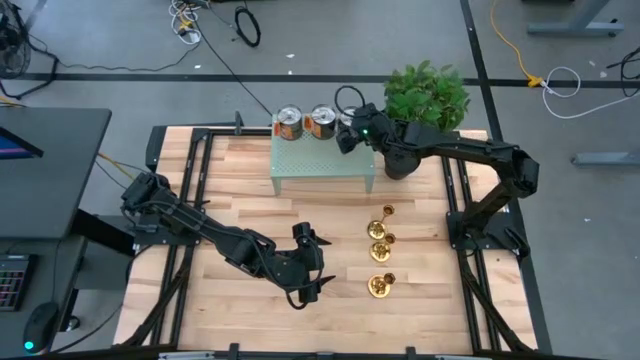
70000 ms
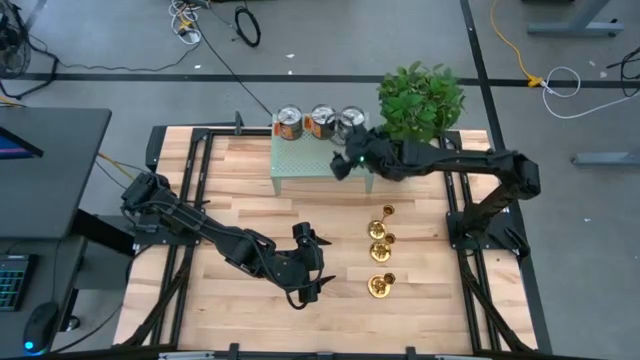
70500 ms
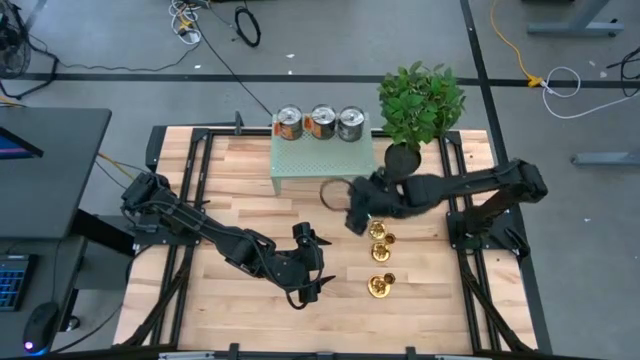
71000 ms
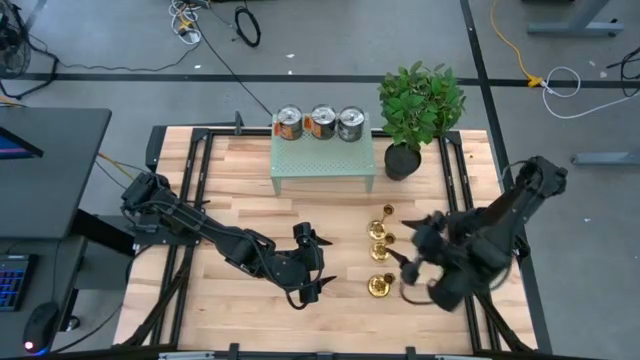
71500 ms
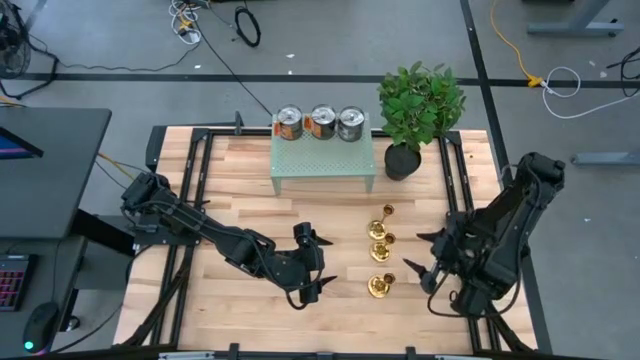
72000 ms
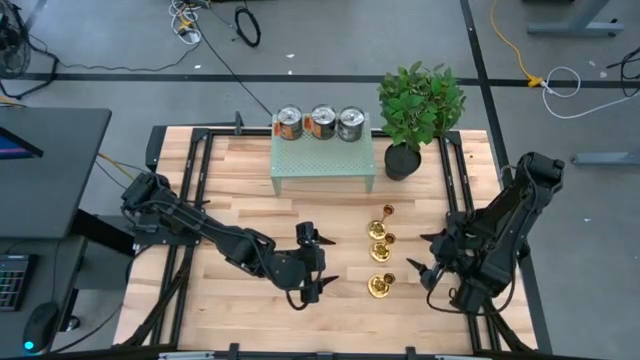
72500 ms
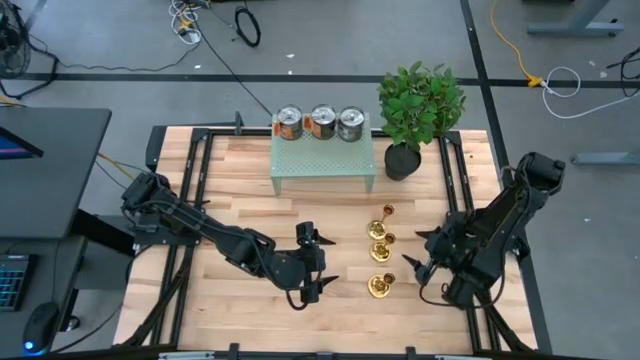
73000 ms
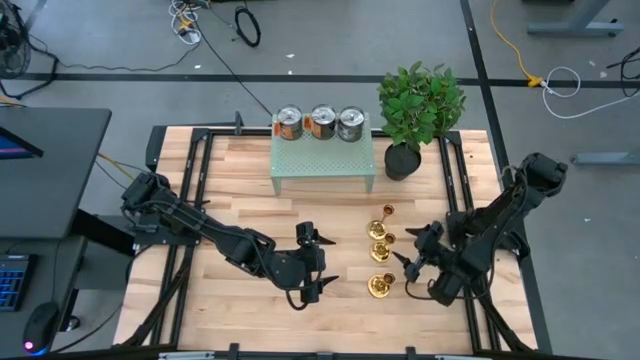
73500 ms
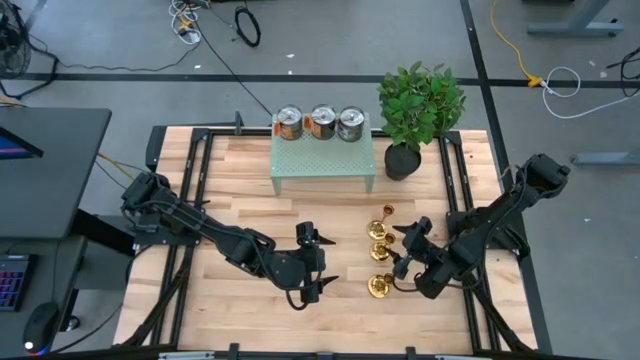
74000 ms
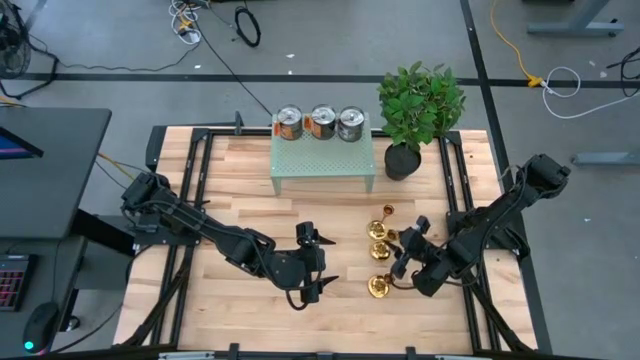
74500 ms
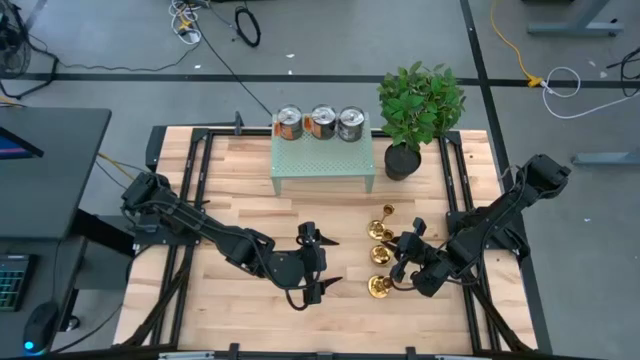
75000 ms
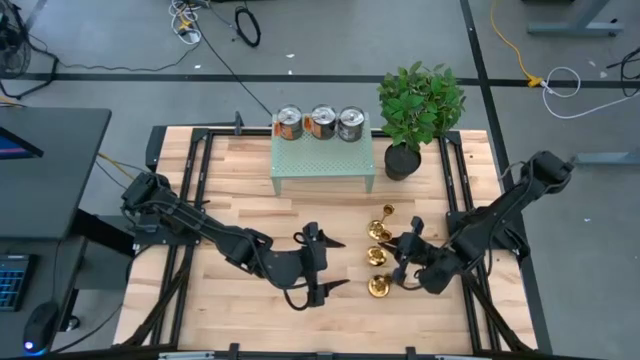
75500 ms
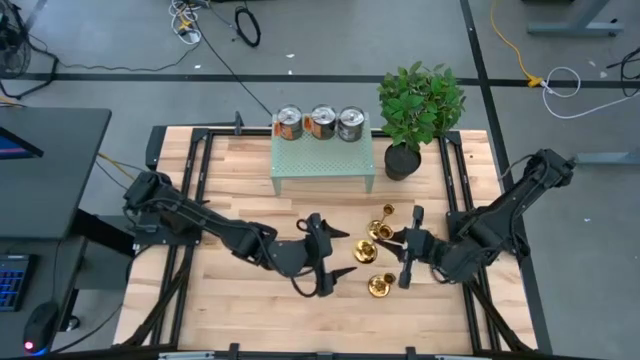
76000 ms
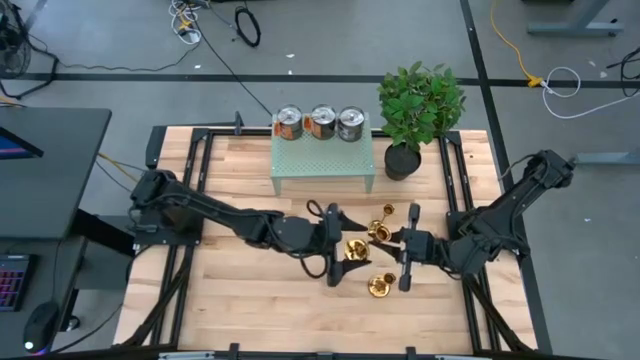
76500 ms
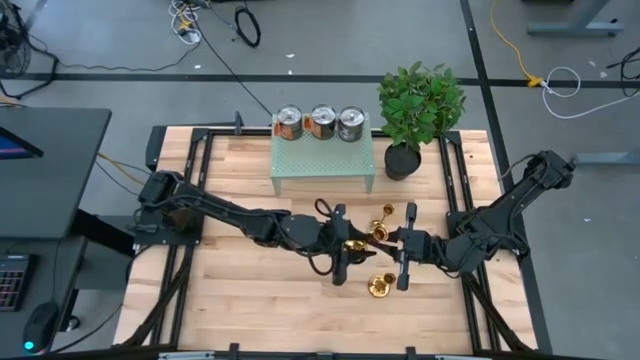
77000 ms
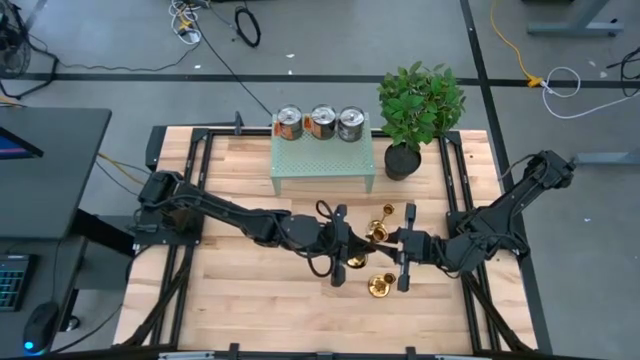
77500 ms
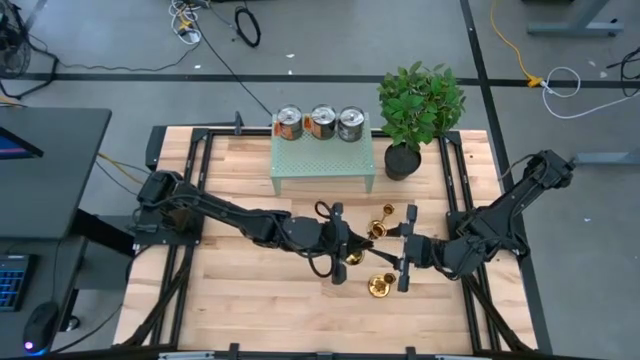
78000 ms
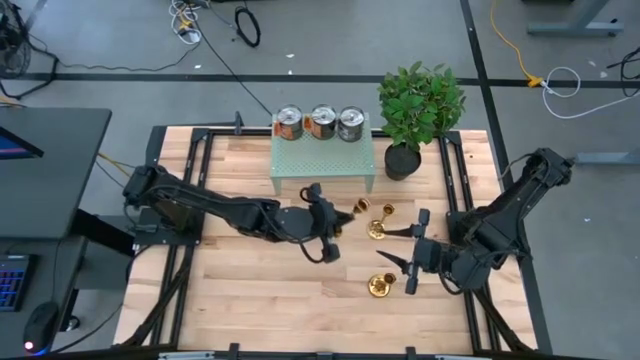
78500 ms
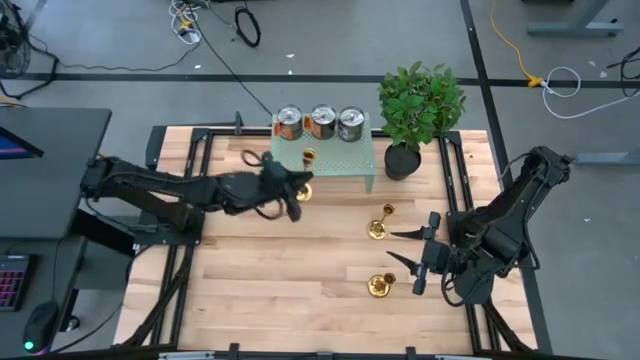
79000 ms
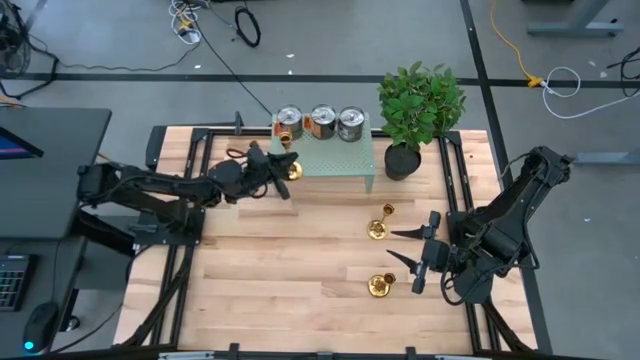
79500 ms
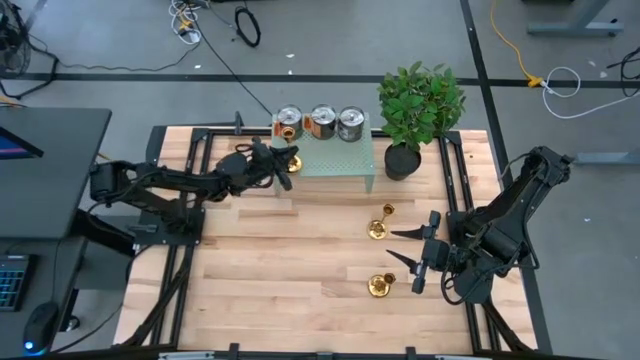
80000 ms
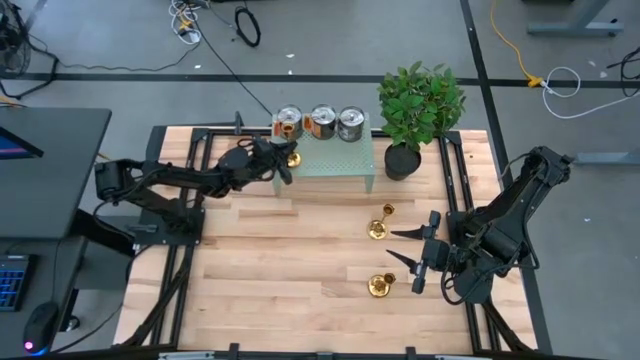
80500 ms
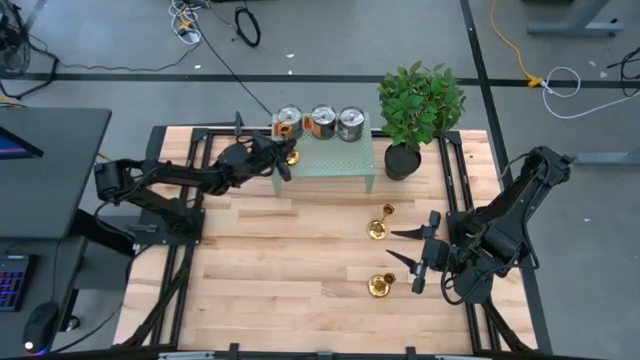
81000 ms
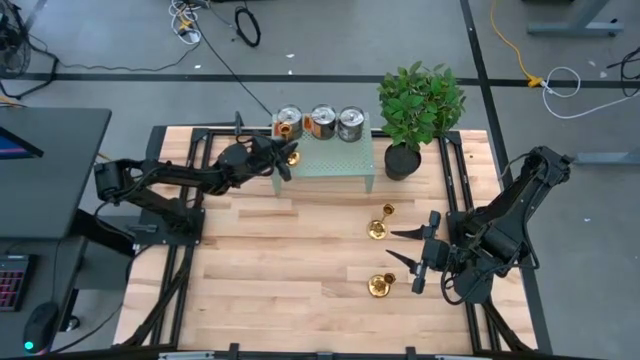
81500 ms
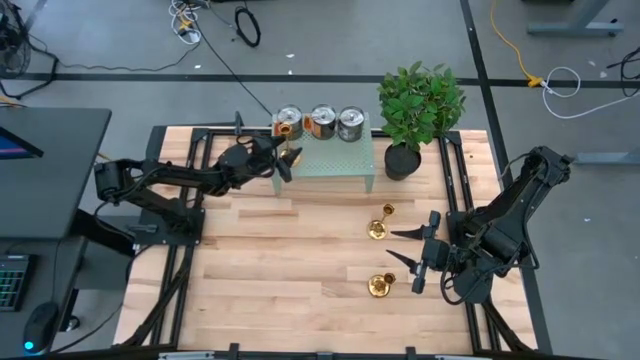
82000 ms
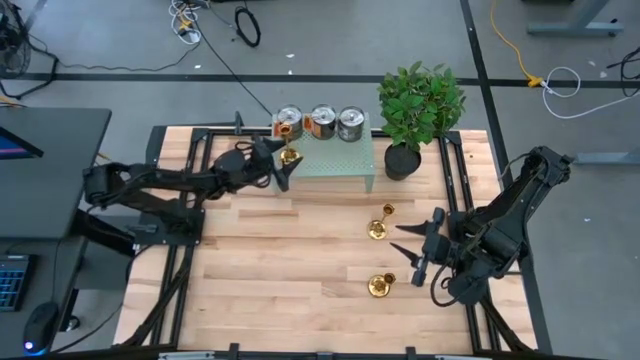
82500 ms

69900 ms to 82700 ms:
Task: Pick & Place candle stick holders
Put the center gold candle holder on the shelf

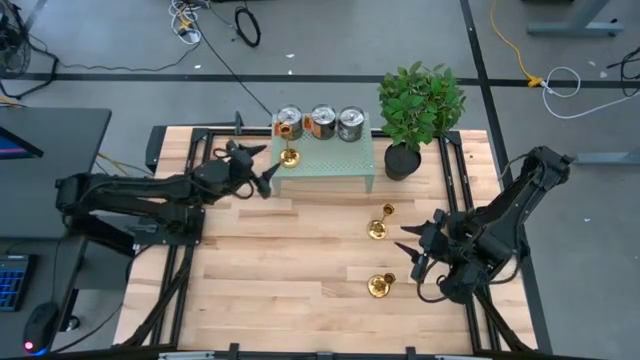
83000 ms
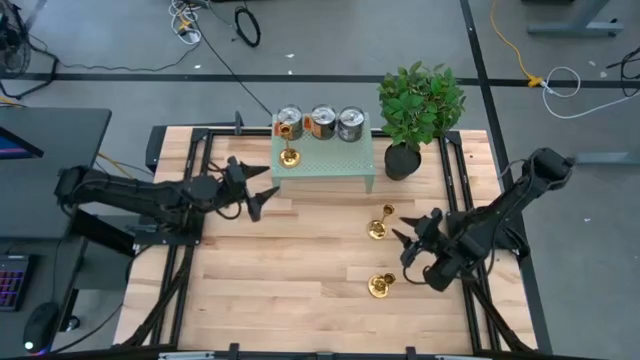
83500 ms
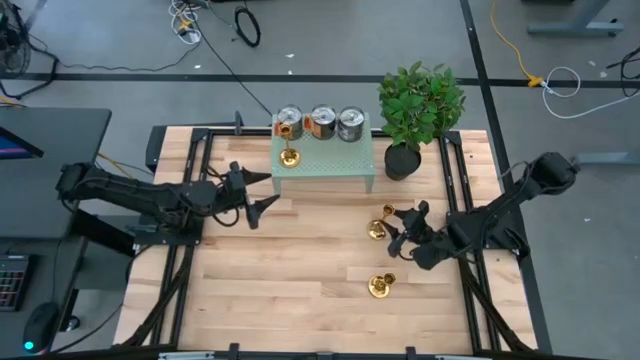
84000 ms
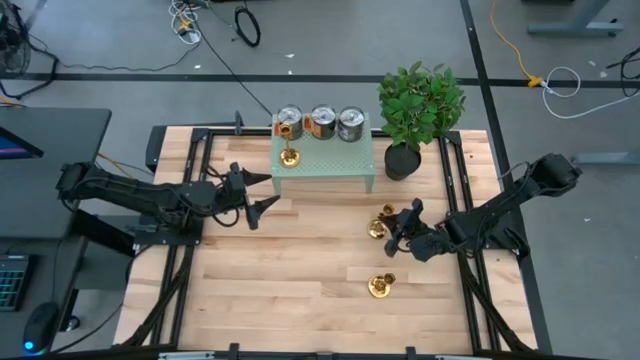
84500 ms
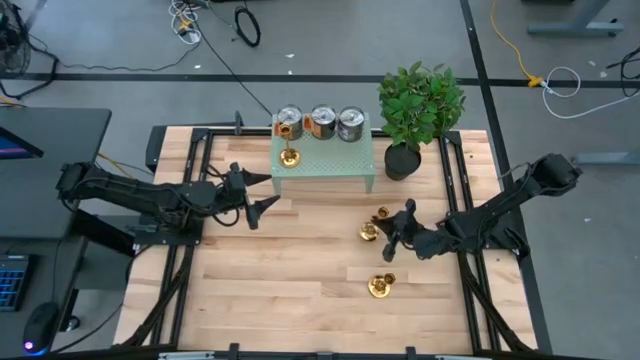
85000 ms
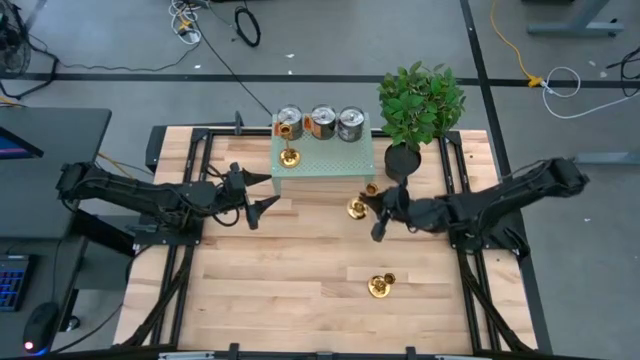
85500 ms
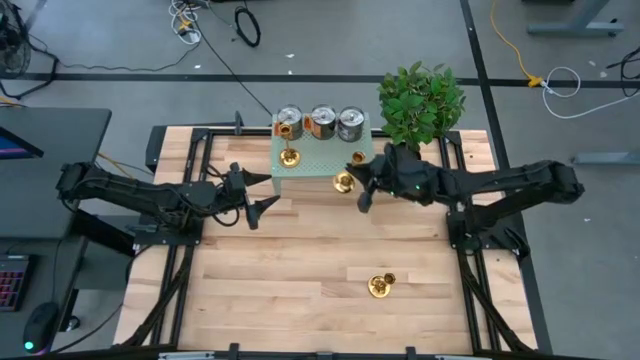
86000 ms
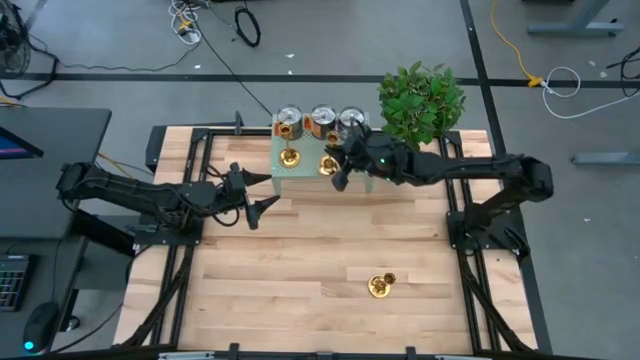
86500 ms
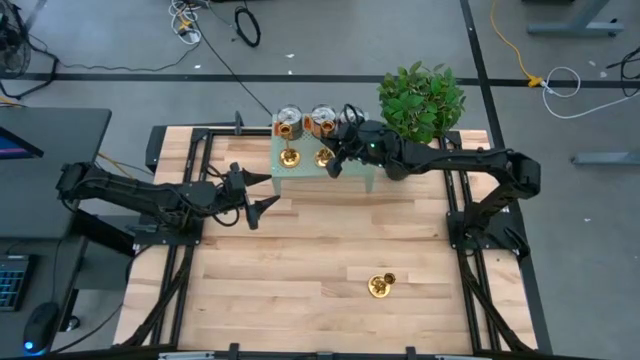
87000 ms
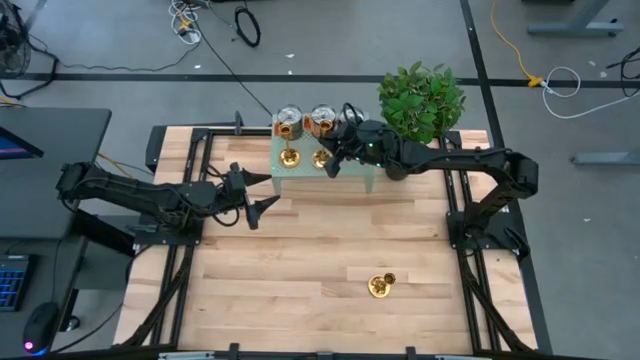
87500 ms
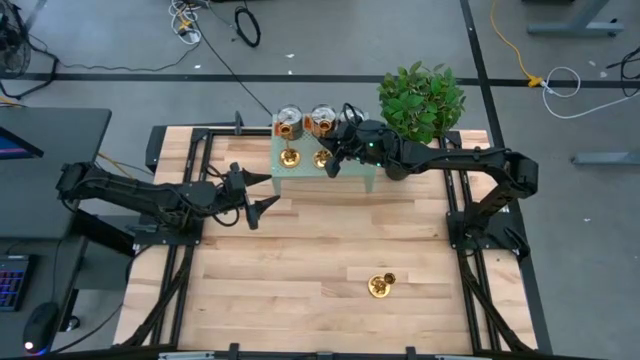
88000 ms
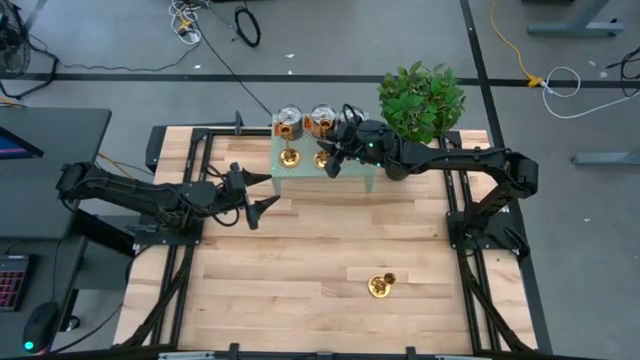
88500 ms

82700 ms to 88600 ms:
Put the top gold candle holder on the shelf aligned with the other gold candle holder

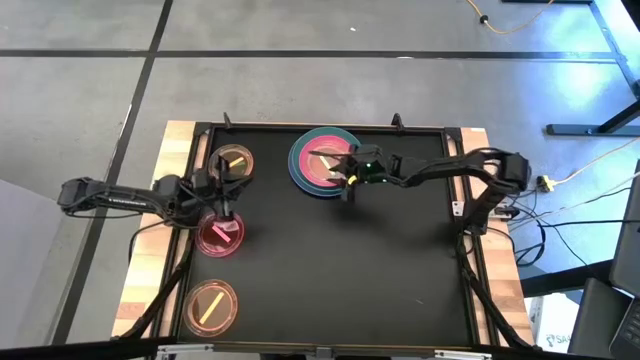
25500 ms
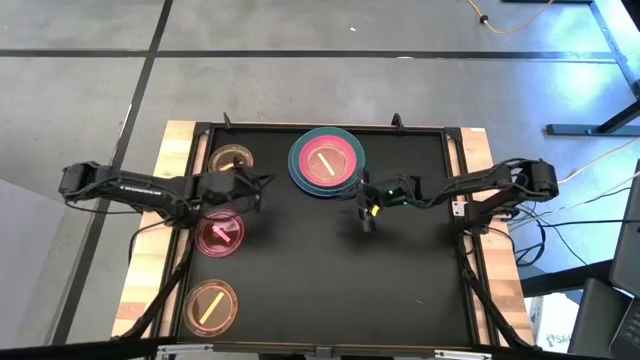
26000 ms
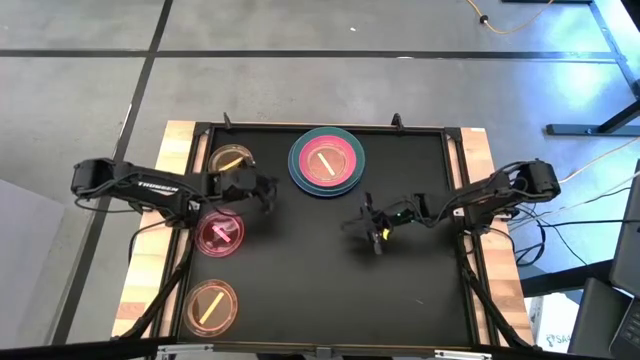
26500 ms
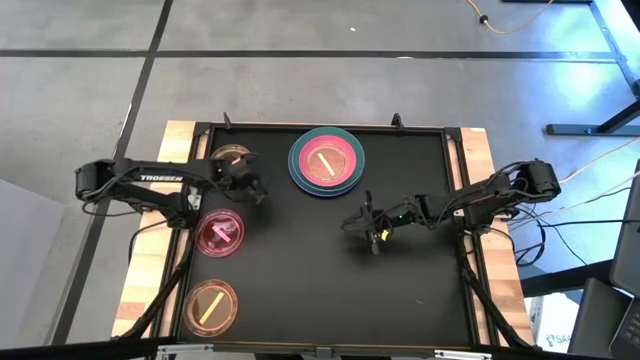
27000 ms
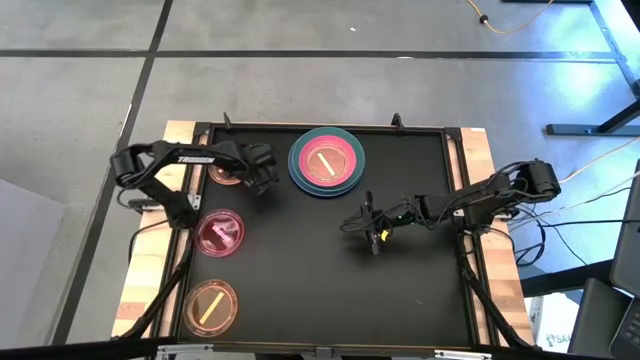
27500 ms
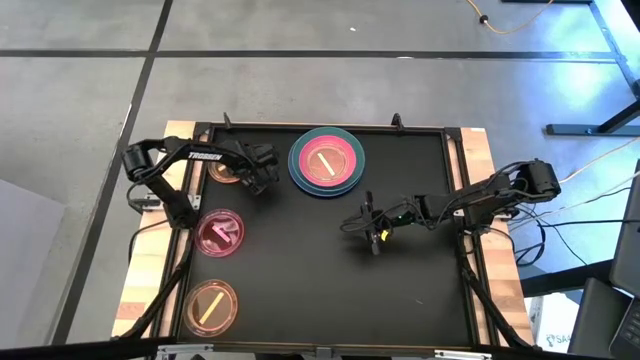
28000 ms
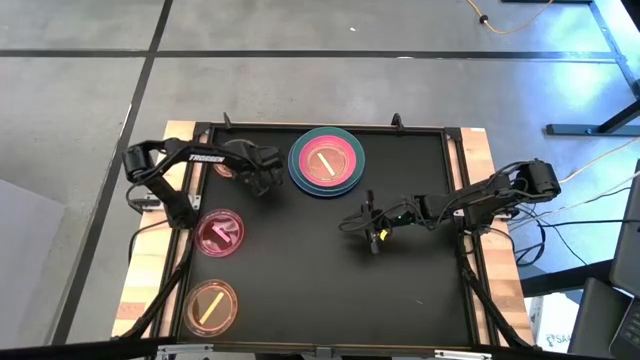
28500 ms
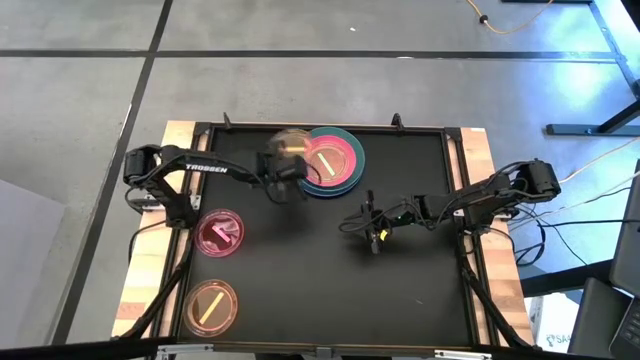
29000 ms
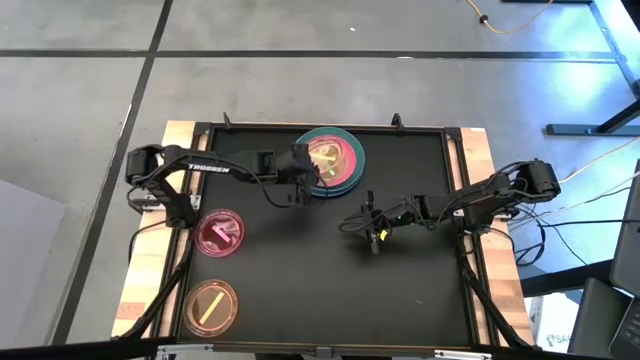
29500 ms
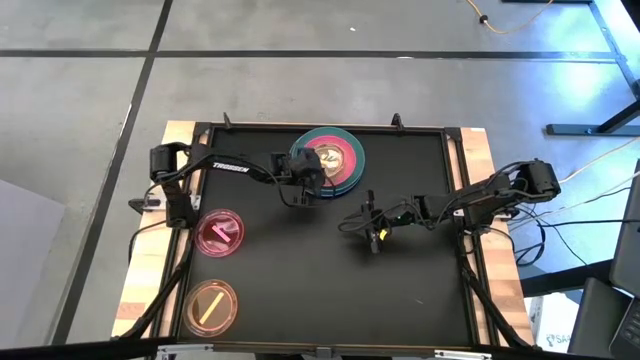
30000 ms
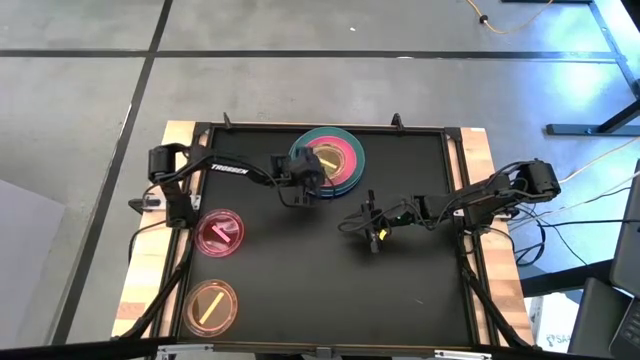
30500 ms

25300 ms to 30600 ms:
Task: Stack plastic plates
Stack the top orange plate on top of the light green plate
